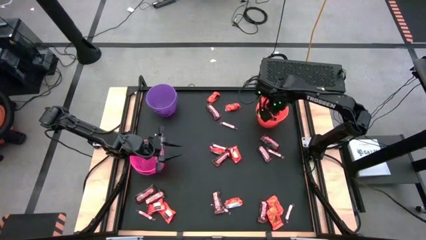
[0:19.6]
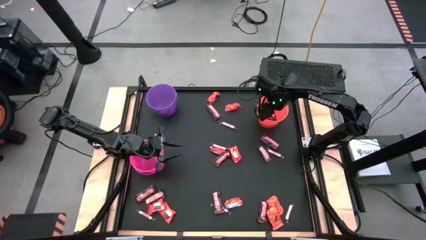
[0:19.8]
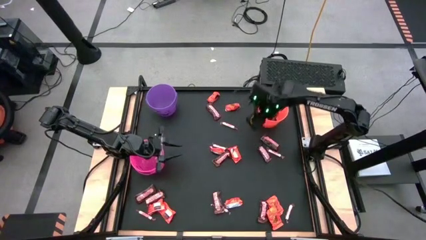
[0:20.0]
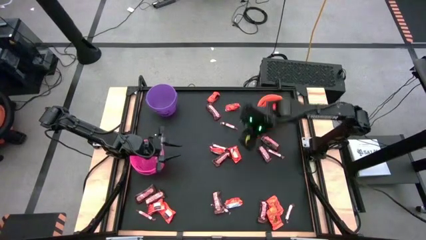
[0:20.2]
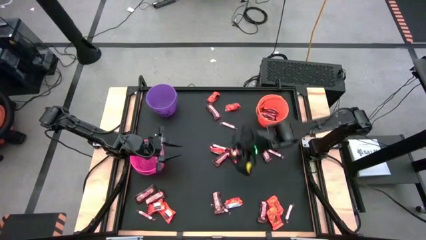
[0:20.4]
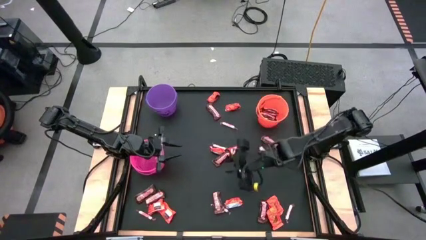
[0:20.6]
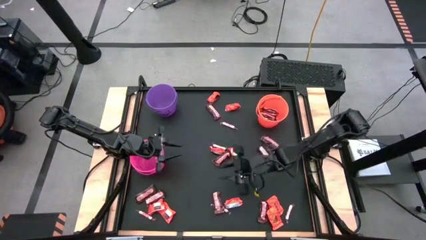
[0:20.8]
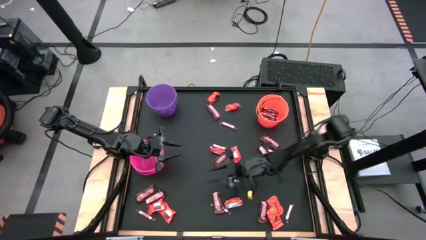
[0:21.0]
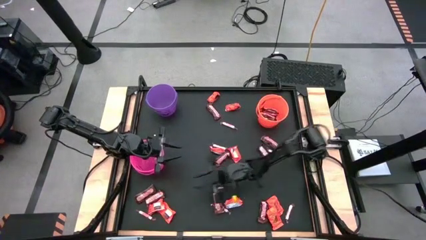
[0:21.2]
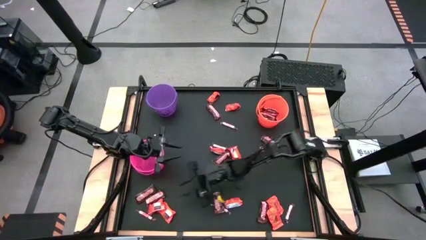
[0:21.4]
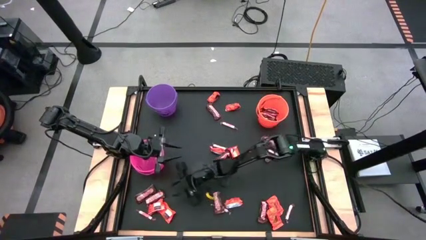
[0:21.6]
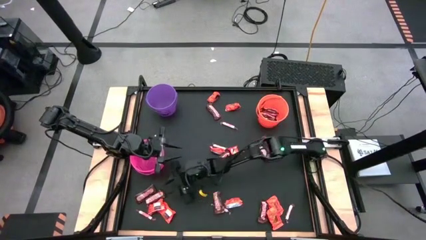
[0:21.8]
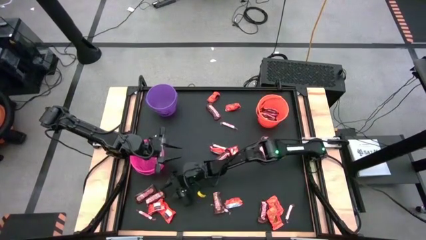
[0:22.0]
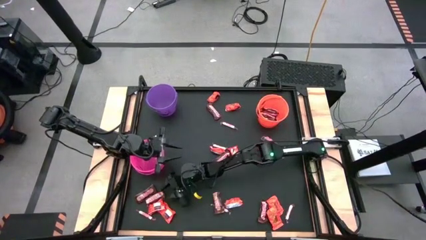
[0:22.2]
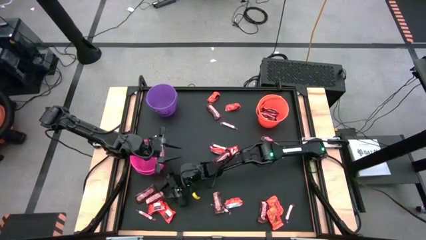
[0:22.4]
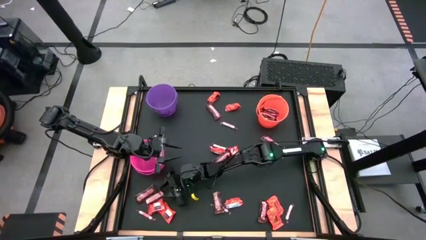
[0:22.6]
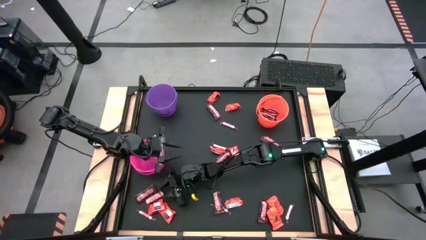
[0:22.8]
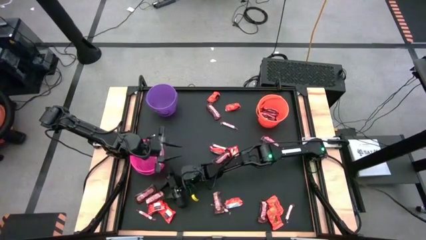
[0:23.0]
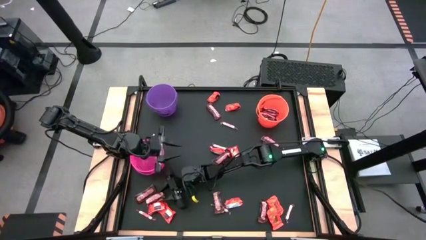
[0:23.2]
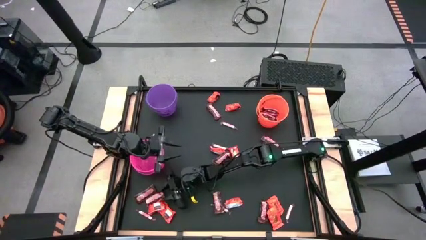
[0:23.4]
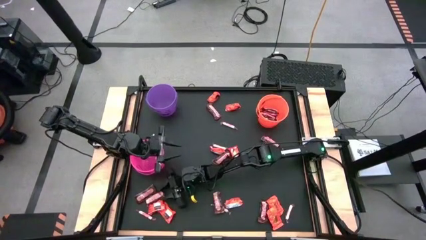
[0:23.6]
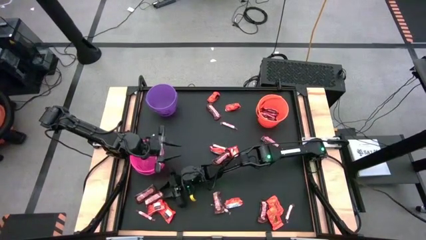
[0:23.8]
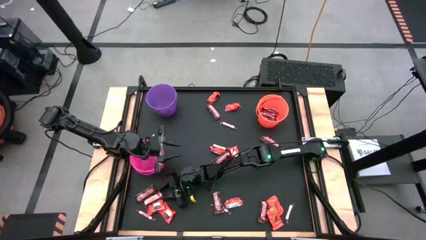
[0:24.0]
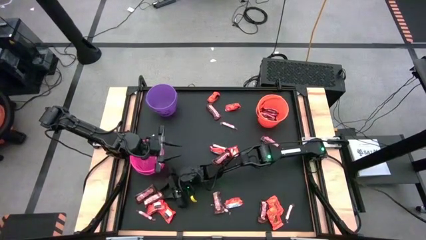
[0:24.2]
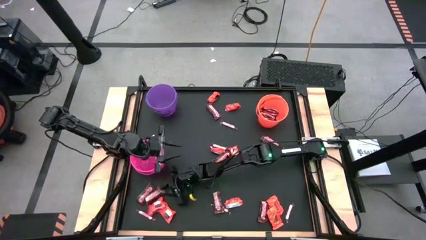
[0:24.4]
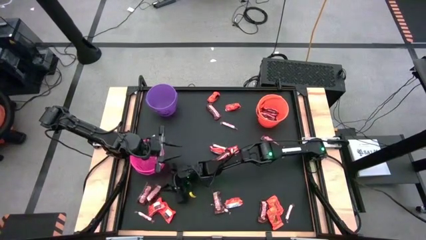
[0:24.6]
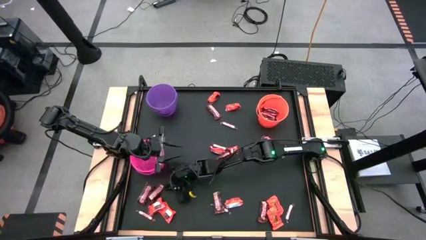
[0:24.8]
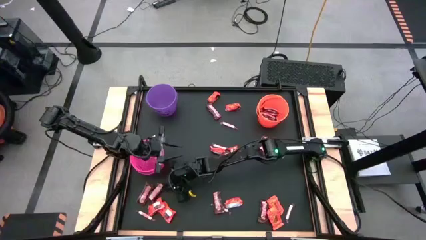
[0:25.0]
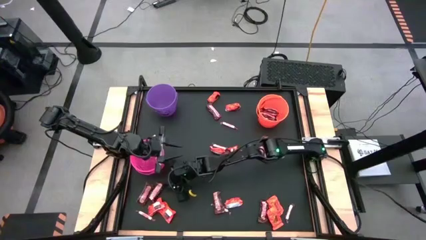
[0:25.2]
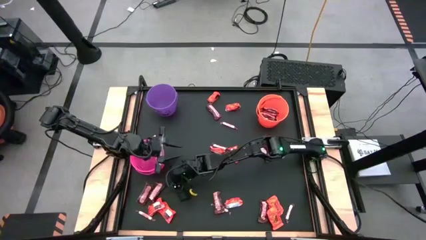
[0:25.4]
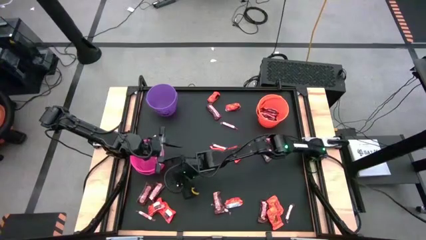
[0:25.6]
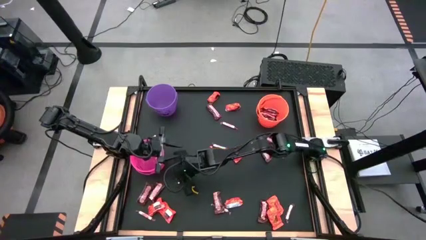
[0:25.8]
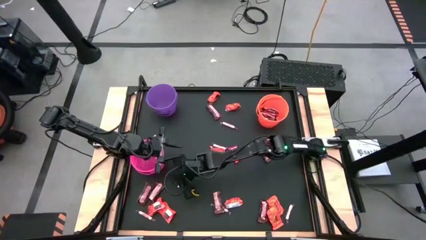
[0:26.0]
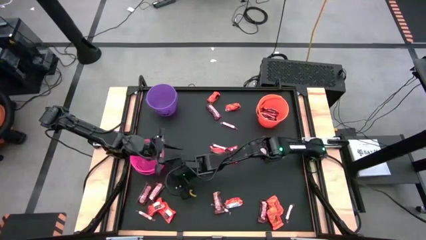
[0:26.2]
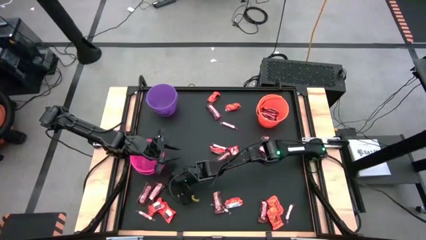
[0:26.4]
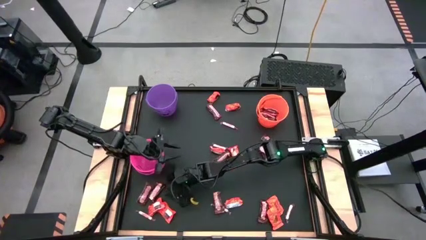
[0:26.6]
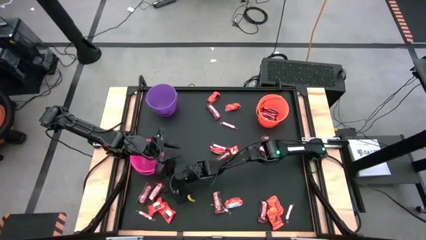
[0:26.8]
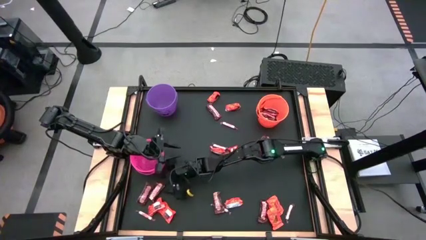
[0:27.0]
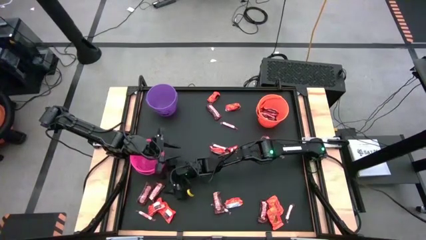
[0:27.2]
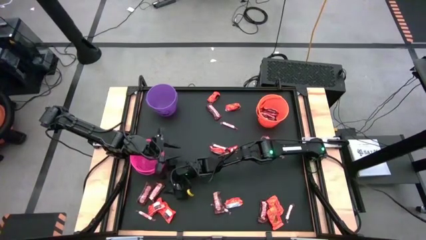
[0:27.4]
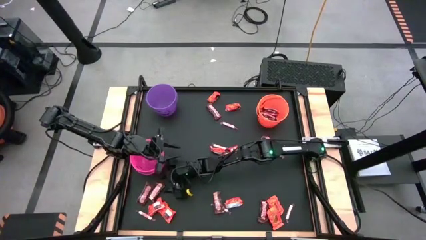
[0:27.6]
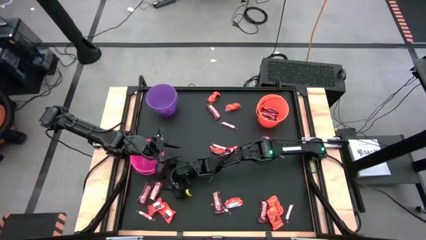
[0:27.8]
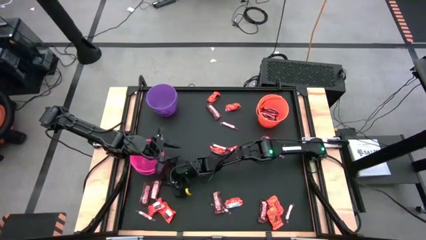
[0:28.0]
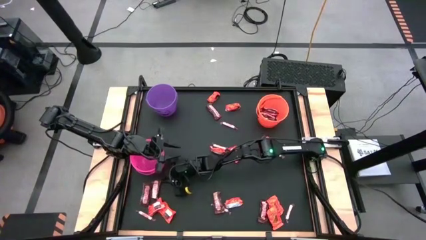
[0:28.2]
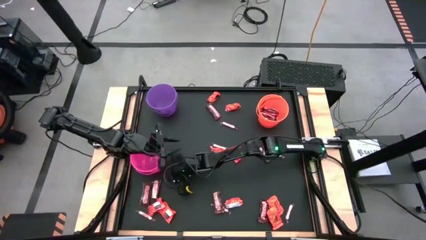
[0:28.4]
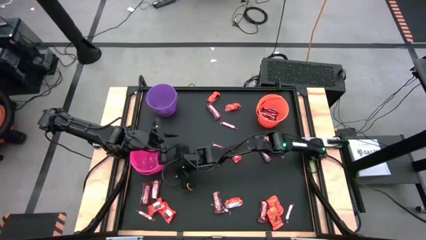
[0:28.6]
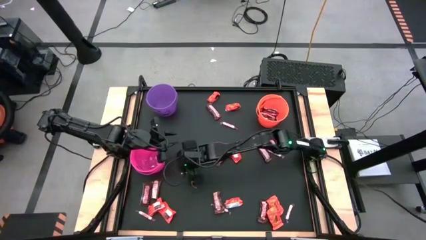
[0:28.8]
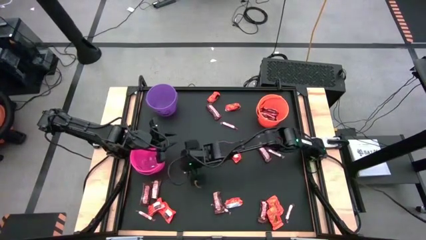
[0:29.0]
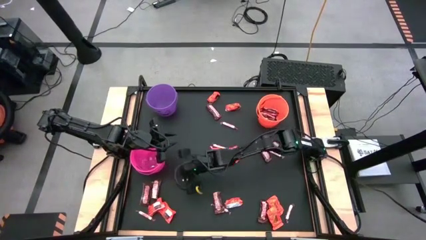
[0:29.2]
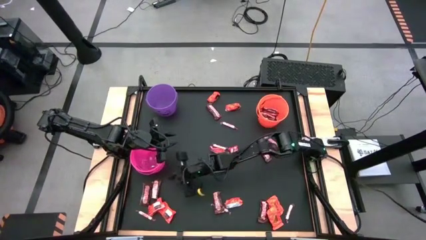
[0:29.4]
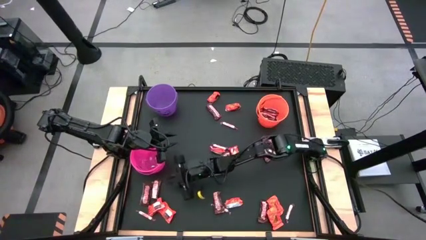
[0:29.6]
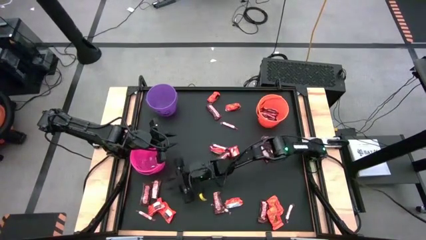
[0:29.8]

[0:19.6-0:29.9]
Task: Sort candy by brand, put in halloween buckets
Put the brown candy into the orange bucket

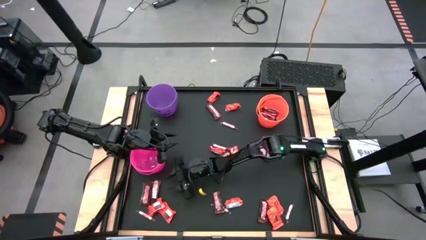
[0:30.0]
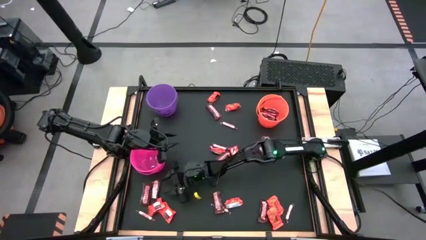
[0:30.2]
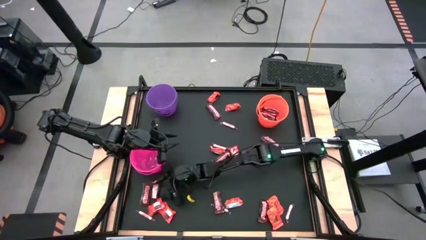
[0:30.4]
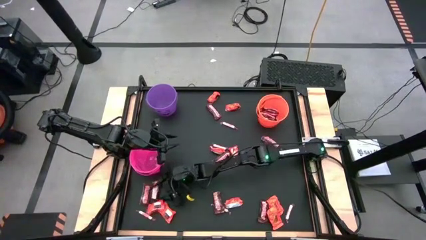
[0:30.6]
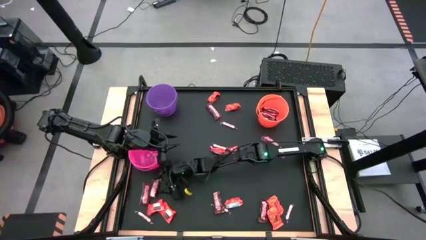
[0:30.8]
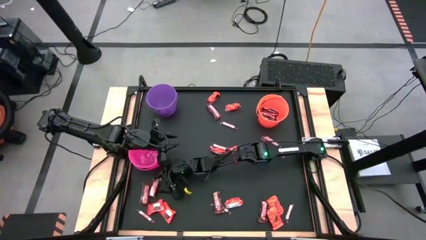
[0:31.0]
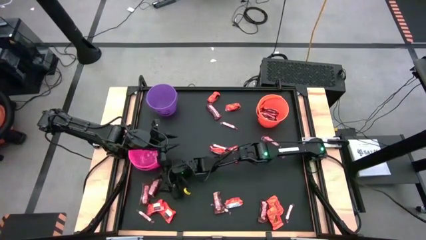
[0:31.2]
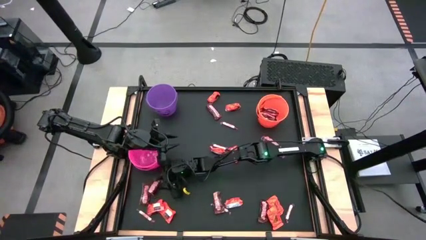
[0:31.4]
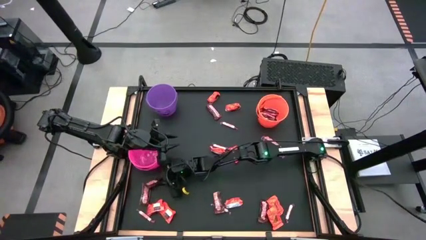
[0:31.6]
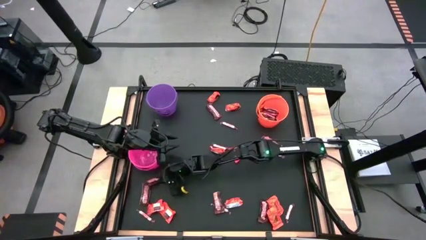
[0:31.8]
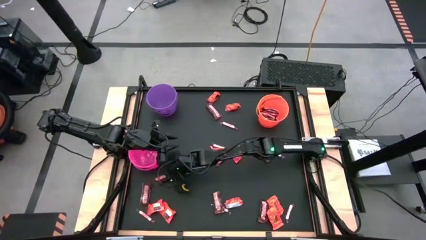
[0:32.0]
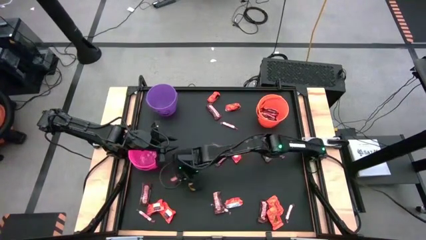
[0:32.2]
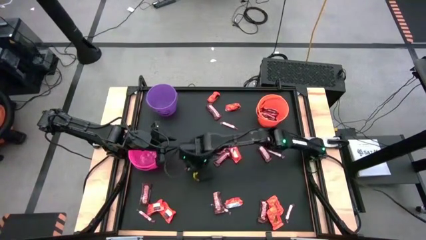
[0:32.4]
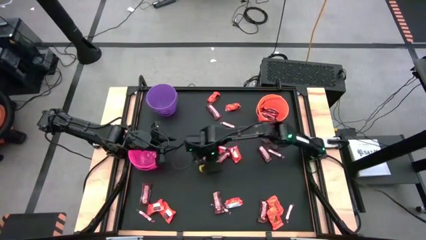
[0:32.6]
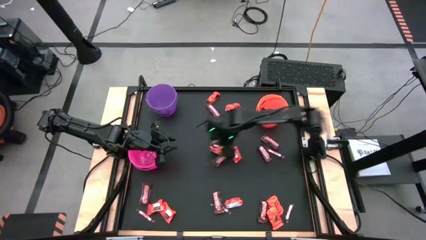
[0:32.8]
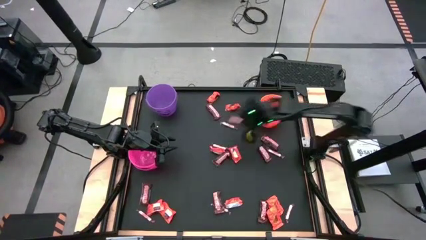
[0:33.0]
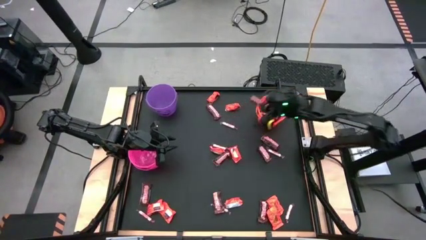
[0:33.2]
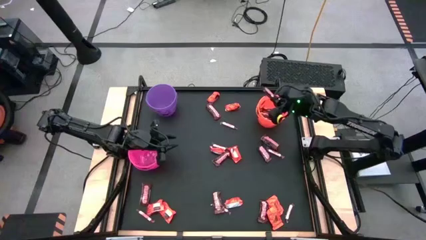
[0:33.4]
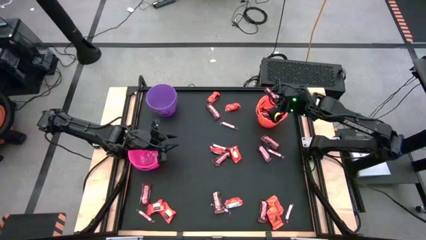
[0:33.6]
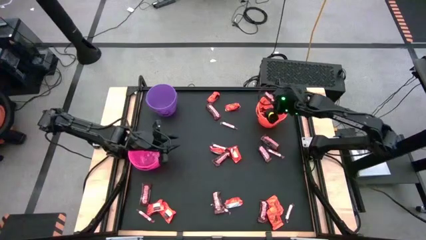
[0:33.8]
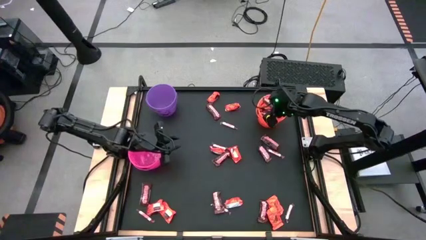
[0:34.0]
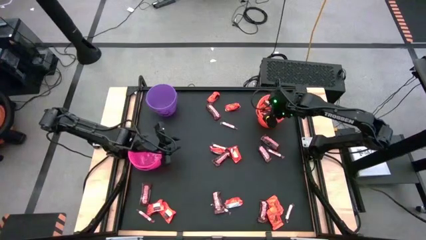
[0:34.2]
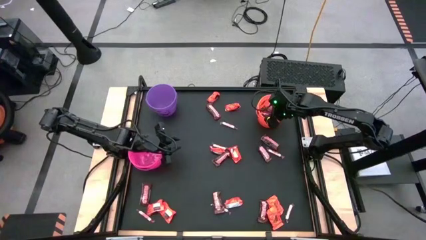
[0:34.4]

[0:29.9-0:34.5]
Put the brown candy into the orange bucket
